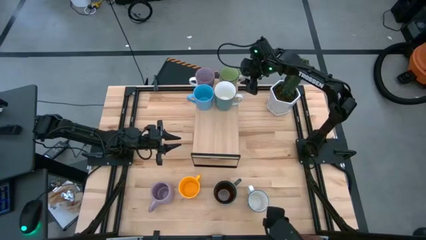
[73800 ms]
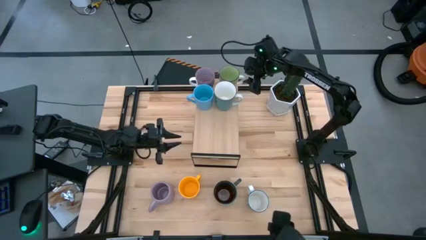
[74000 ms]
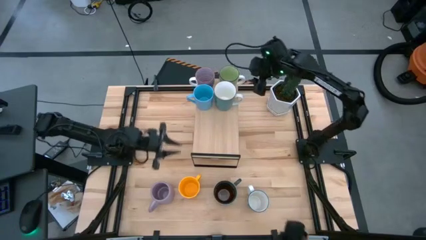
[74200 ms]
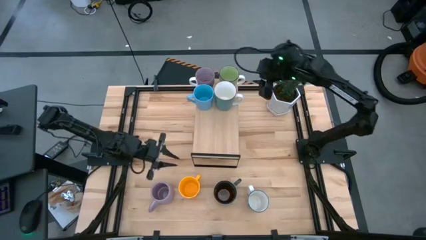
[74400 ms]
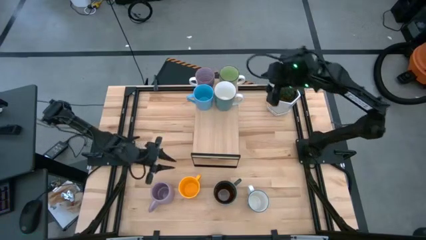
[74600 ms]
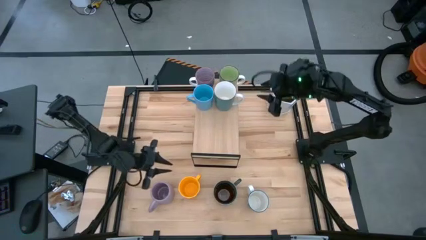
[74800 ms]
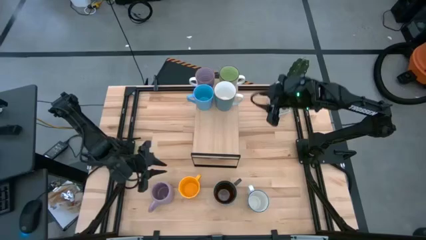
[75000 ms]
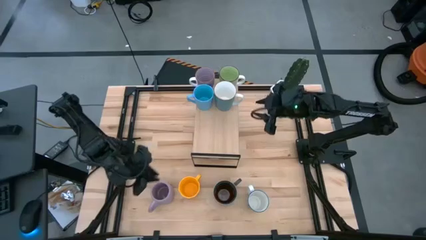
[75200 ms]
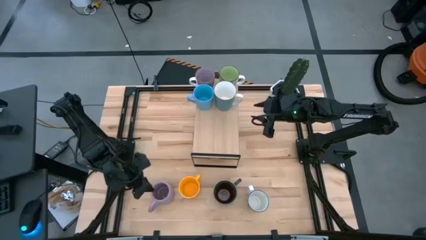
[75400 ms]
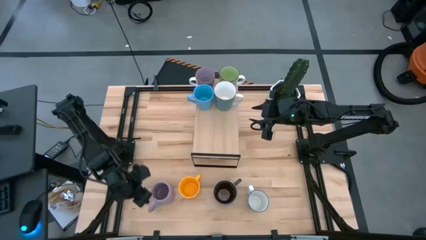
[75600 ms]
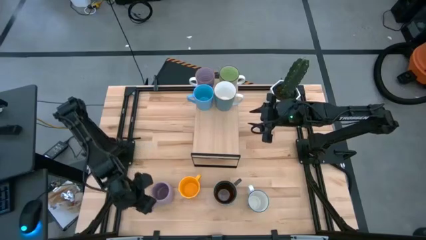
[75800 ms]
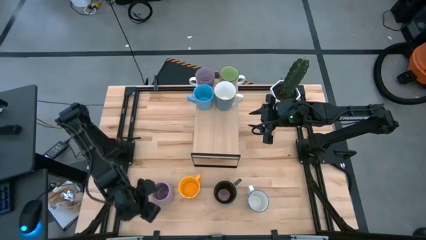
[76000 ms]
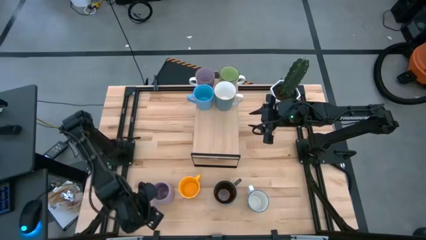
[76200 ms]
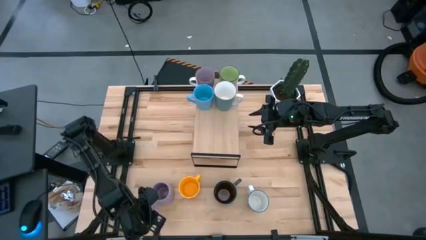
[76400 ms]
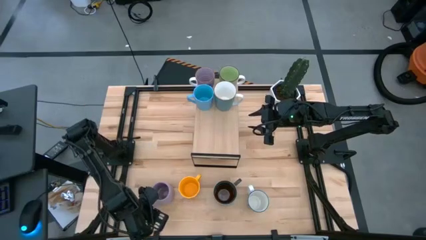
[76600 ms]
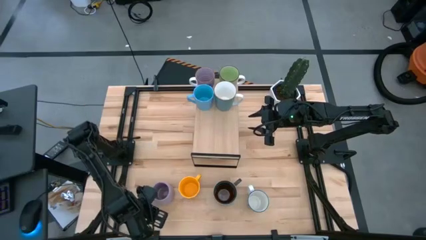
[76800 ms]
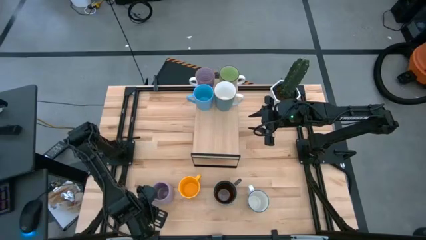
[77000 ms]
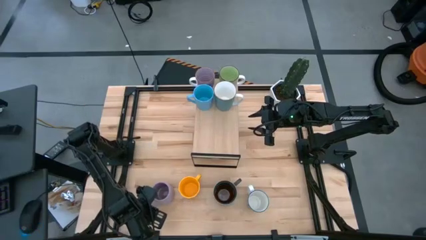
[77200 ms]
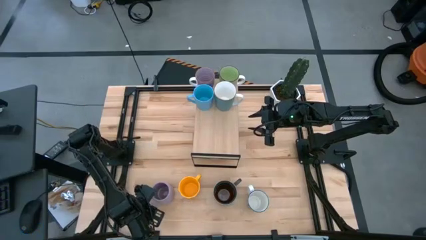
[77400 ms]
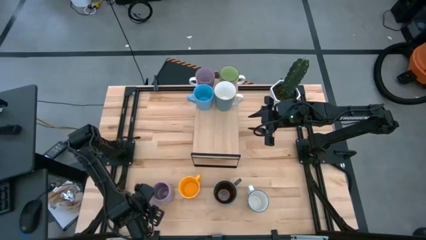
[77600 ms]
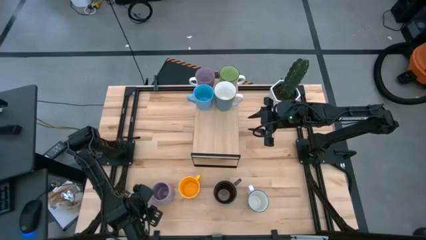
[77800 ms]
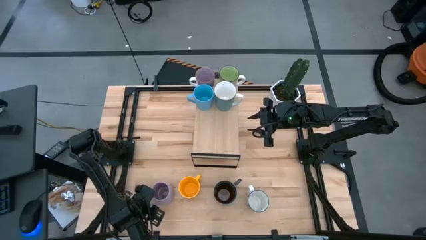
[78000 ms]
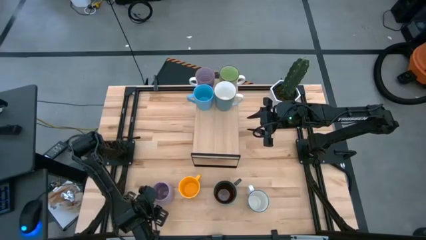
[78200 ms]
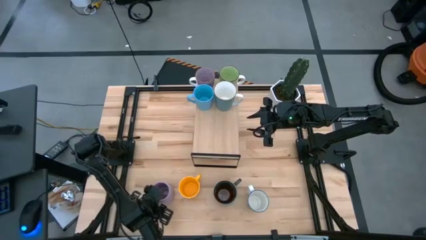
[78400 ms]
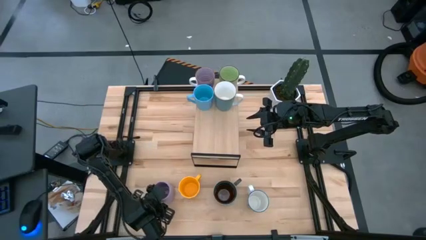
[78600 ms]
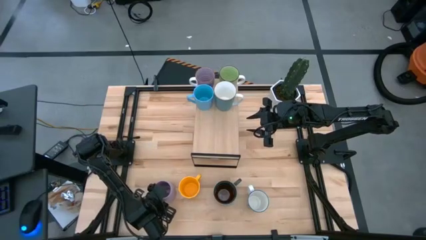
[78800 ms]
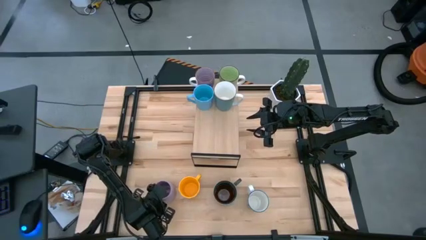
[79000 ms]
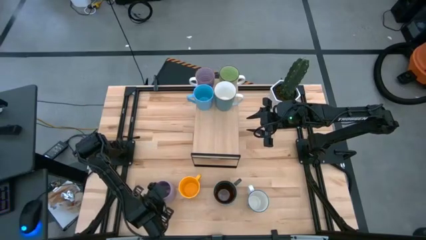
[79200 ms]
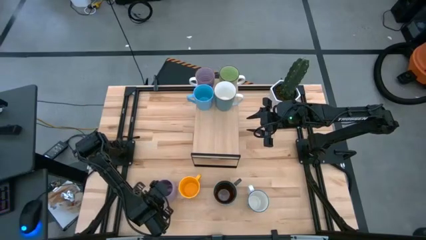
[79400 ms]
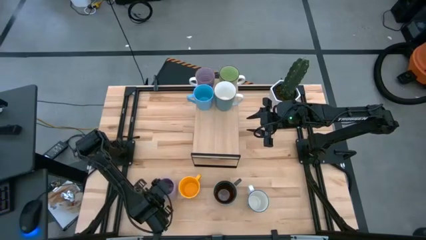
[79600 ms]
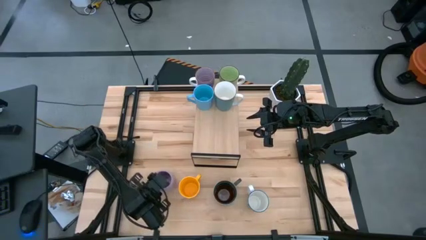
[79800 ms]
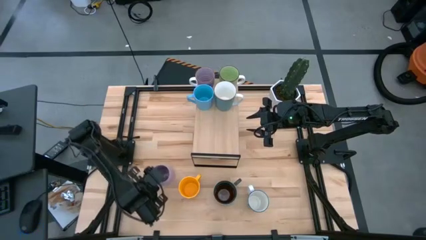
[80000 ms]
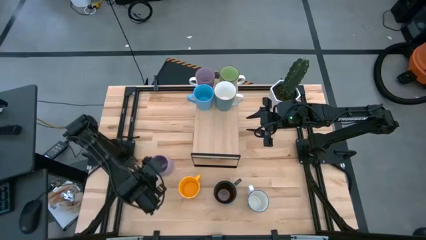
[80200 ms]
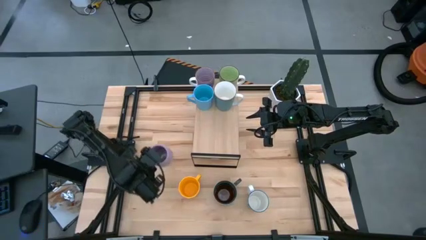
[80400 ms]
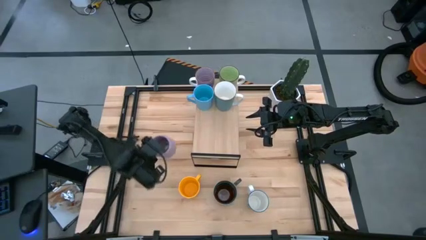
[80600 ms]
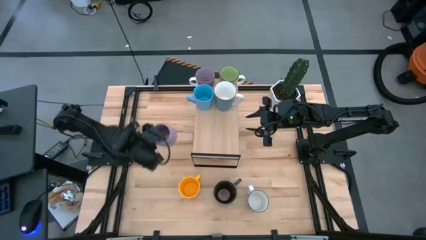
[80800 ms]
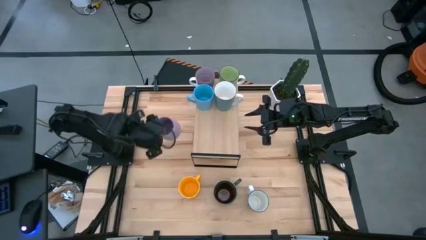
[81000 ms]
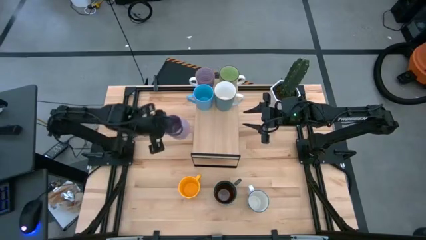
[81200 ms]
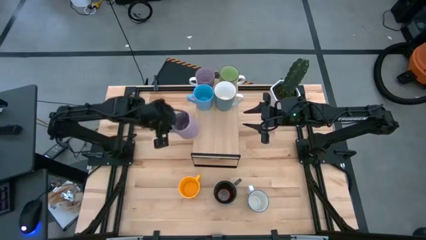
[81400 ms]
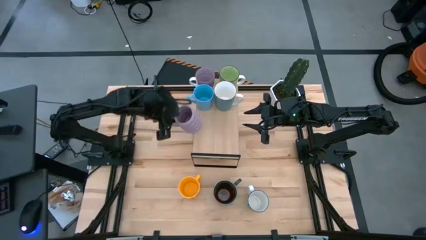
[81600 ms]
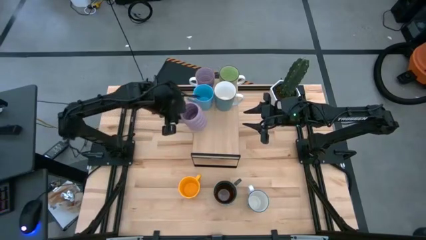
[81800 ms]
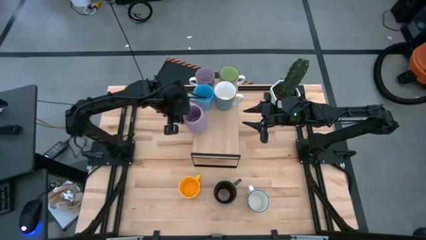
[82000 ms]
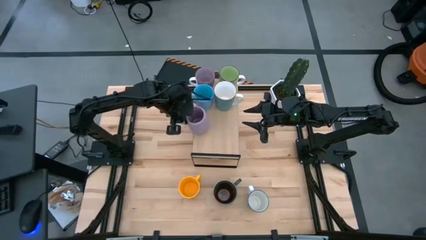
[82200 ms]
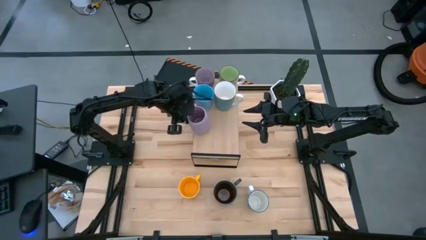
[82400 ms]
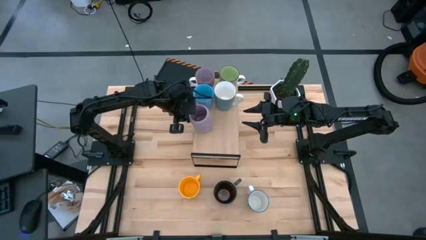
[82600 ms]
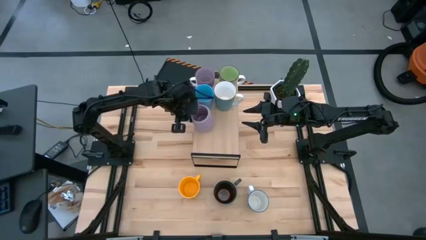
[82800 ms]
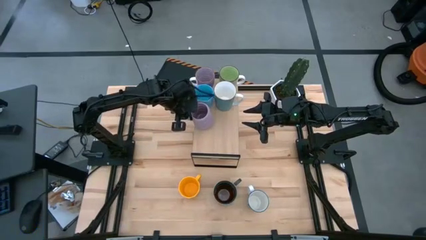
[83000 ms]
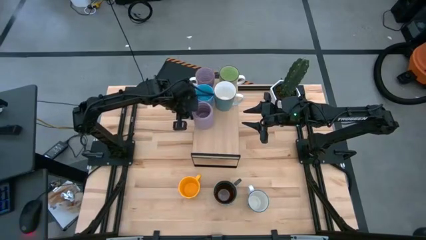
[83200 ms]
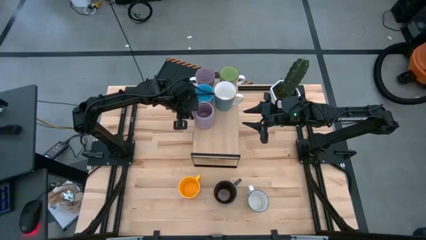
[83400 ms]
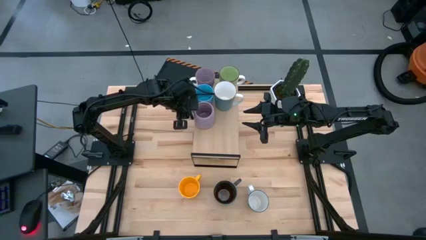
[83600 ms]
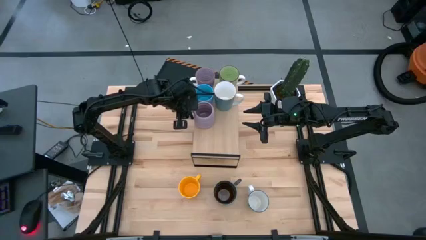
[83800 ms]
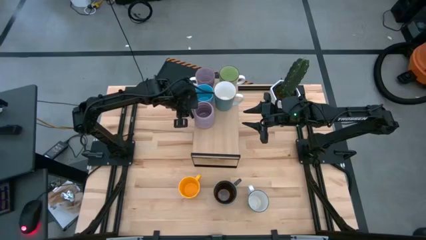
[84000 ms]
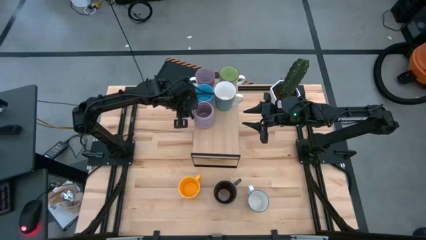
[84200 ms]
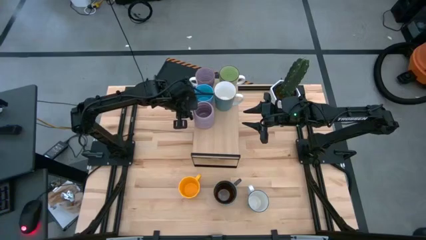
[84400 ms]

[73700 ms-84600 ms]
Task: Place coffee mugs
Put the purple mug on the shelf

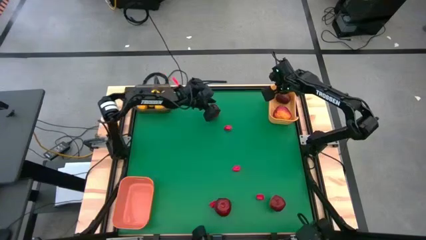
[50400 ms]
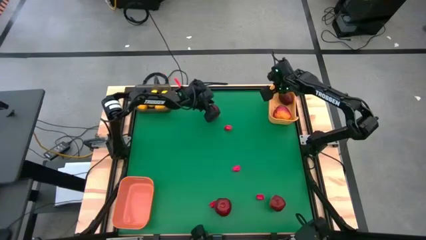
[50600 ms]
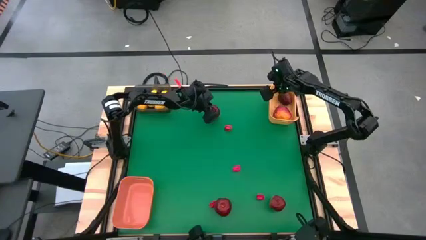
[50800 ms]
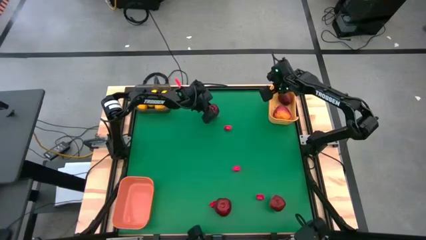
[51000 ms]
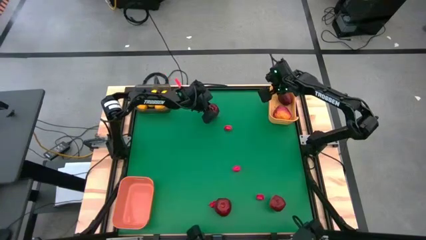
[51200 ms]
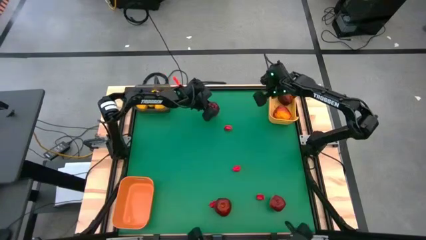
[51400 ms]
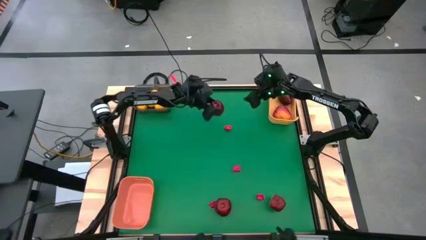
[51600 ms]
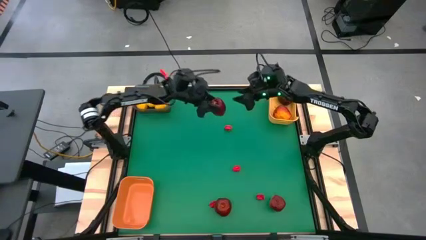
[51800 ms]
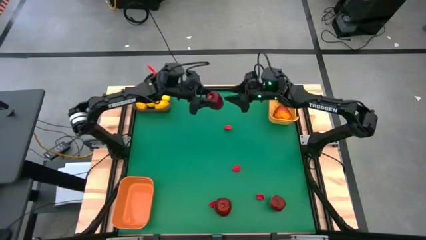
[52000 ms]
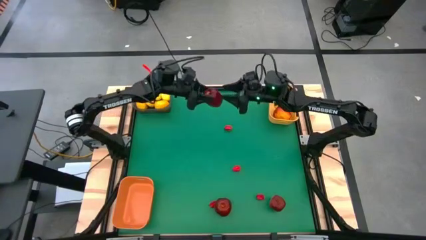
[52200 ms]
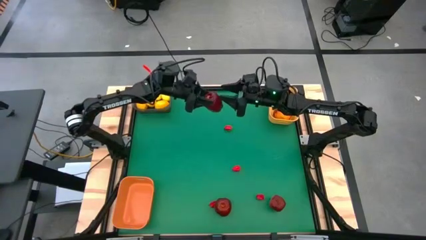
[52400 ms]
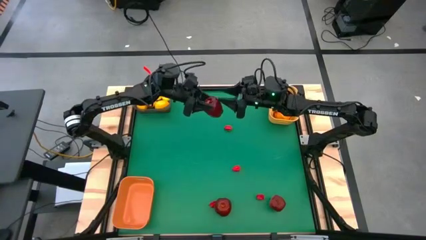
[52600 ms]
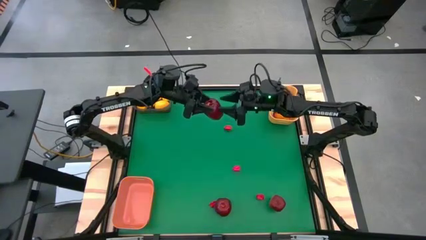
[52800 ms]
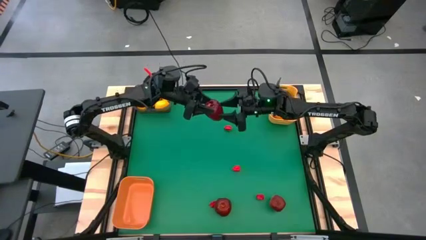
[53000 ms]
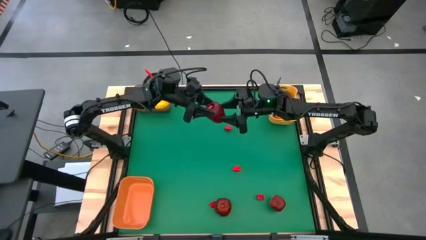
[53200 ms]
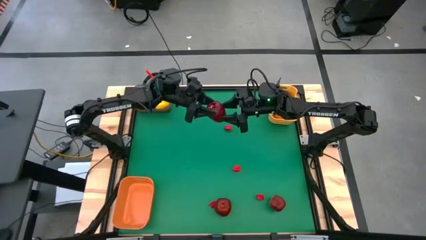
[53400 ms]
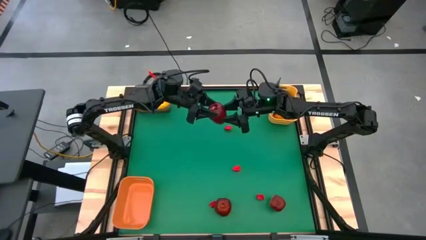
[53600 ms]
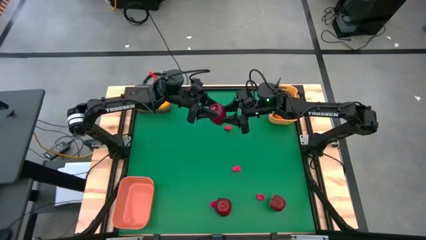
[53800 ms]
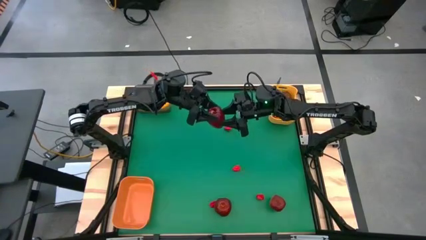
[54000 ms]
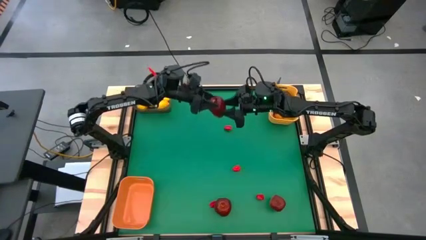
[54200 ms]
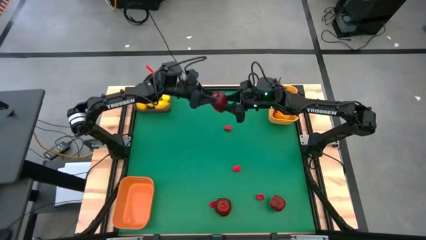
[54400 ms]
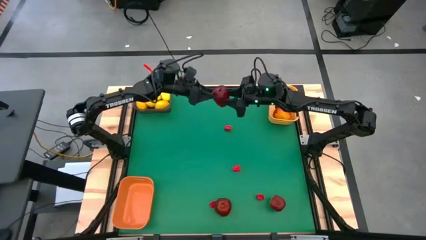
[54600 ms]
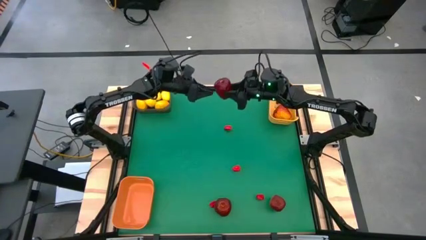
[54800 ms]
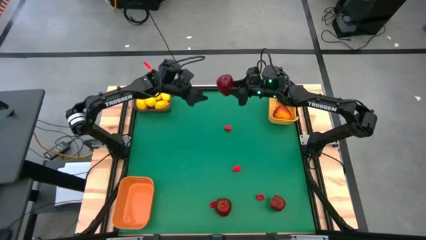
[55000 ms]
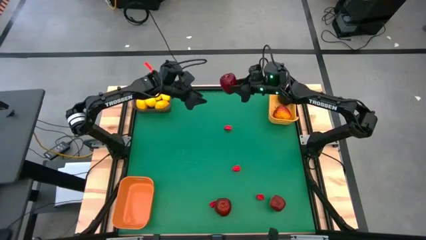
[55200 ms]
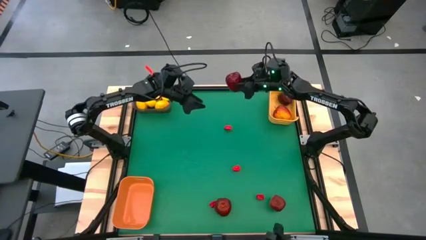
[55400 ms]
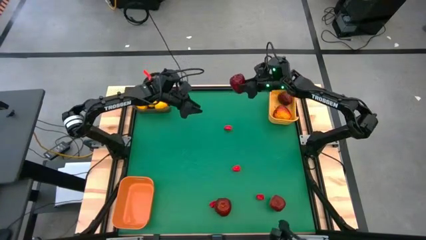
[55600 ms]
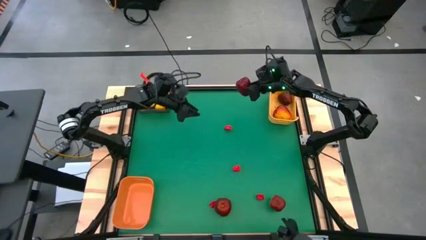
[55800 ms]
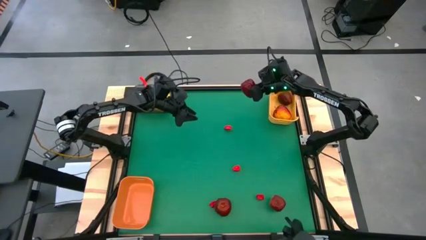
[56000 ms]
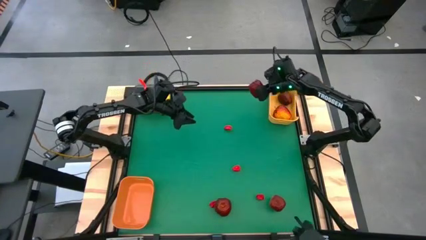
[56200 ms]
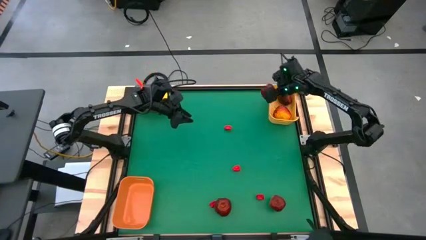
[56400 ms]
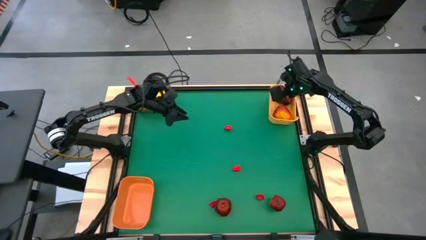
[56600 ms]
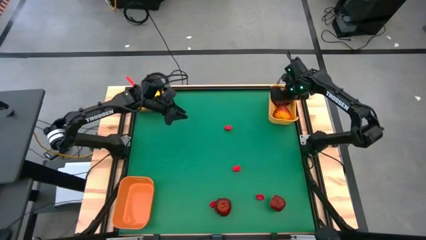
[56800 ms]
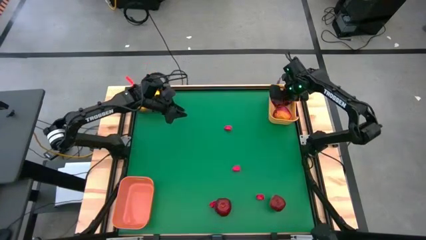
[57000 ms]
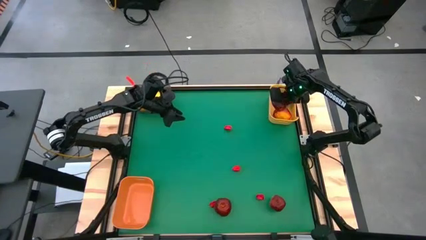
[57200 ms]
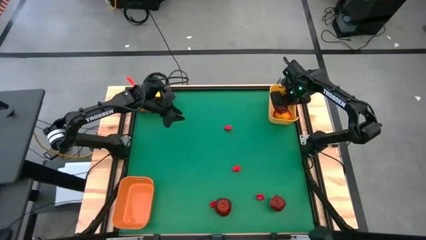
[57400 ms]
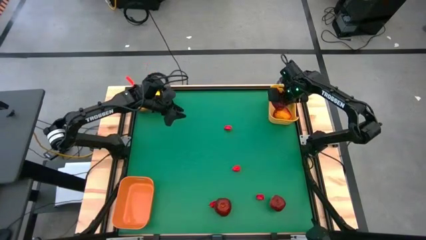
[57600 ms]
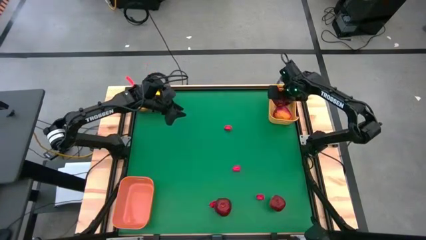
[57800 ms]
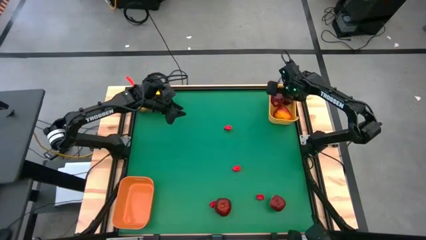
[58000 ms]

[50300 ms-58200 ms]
Task: Sort produce into baskets
Put the top red apple into the yellow bin
